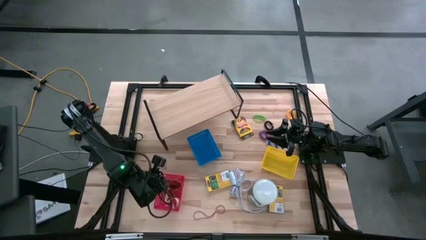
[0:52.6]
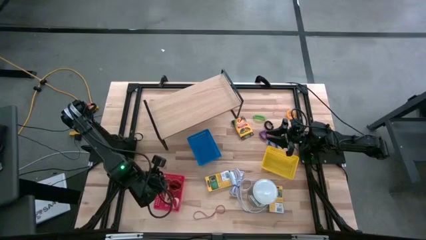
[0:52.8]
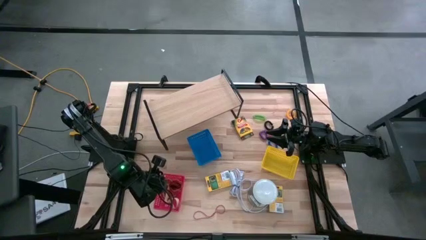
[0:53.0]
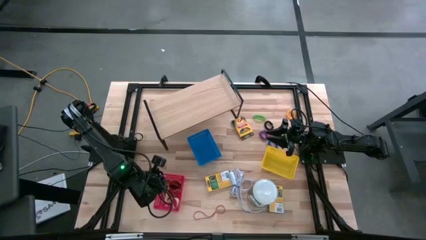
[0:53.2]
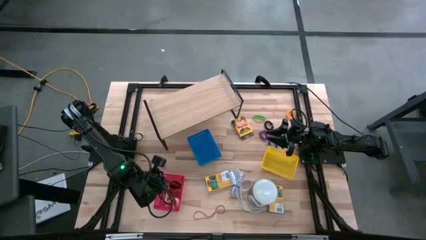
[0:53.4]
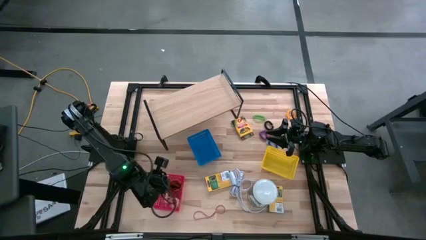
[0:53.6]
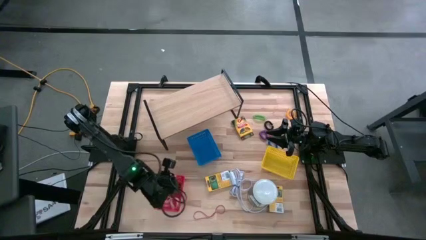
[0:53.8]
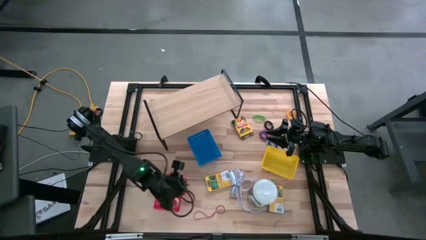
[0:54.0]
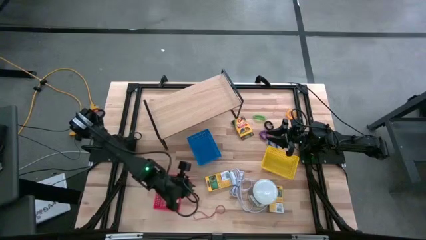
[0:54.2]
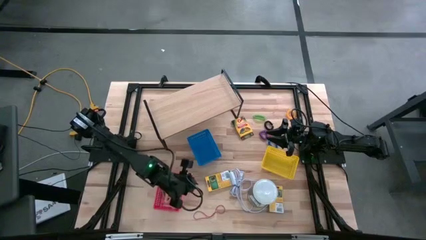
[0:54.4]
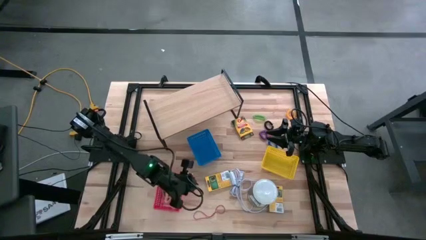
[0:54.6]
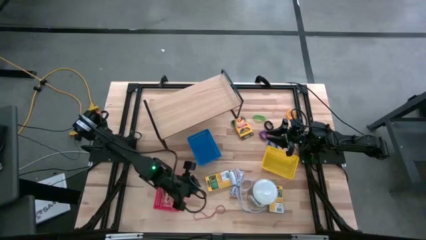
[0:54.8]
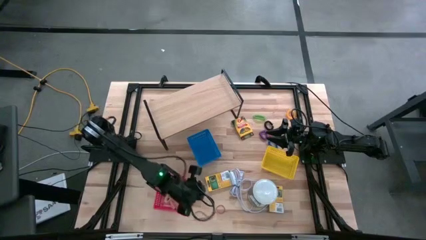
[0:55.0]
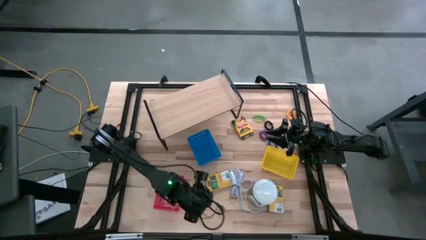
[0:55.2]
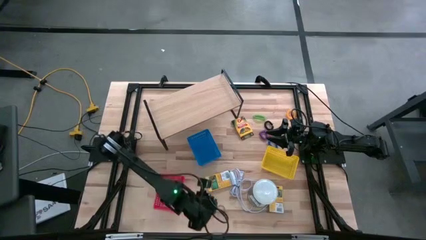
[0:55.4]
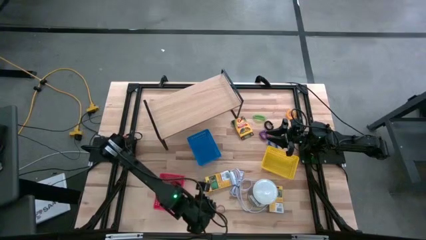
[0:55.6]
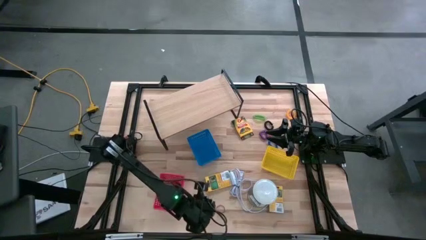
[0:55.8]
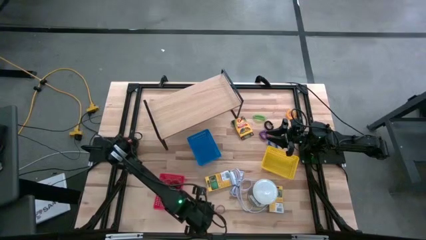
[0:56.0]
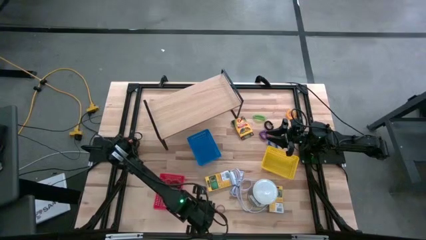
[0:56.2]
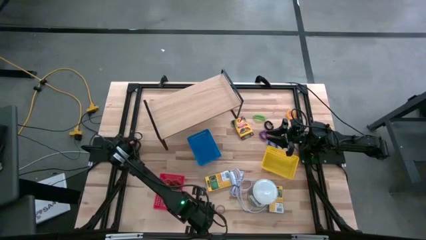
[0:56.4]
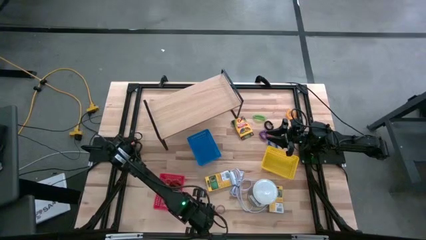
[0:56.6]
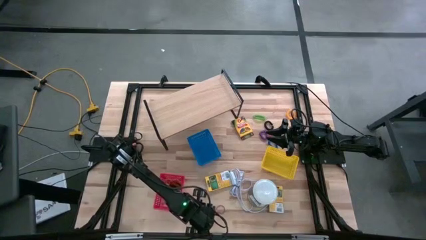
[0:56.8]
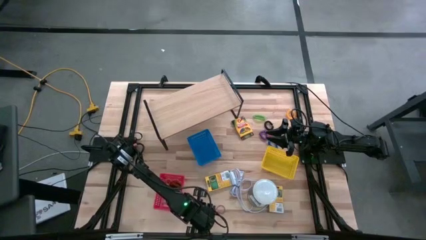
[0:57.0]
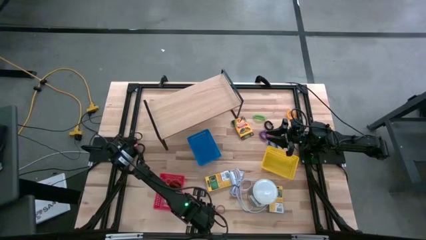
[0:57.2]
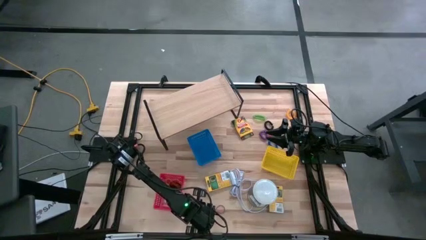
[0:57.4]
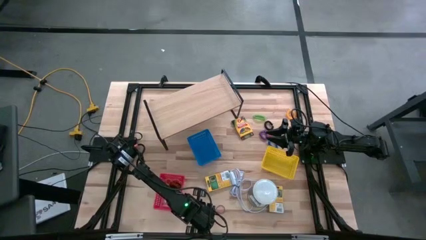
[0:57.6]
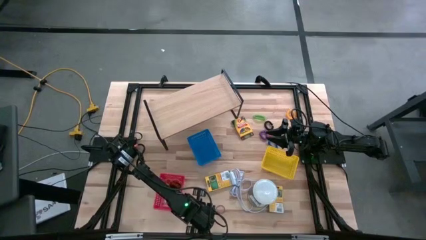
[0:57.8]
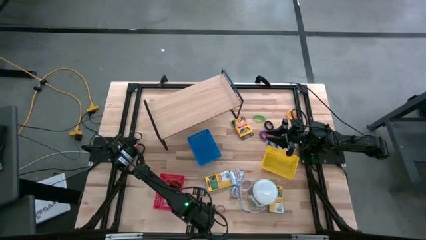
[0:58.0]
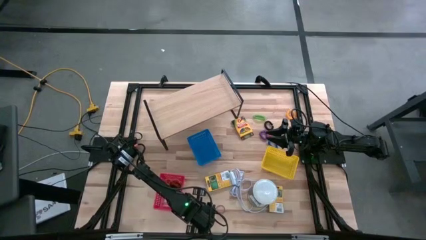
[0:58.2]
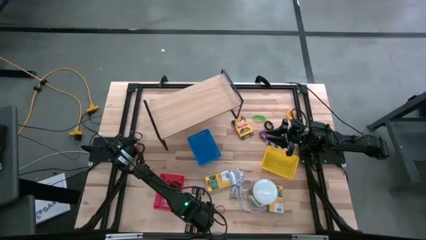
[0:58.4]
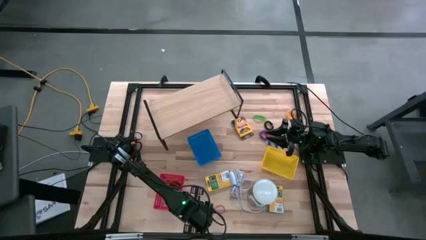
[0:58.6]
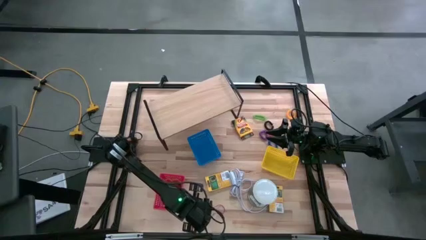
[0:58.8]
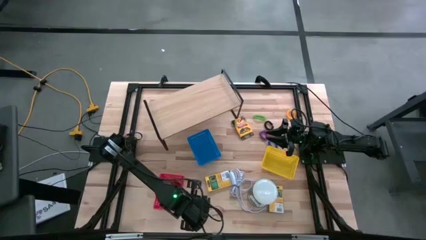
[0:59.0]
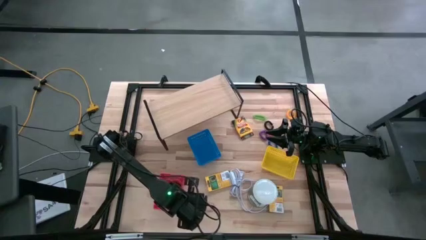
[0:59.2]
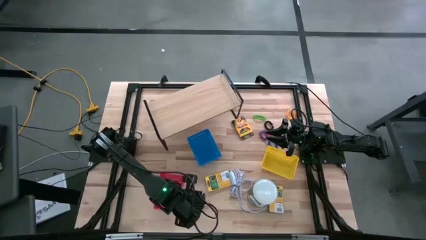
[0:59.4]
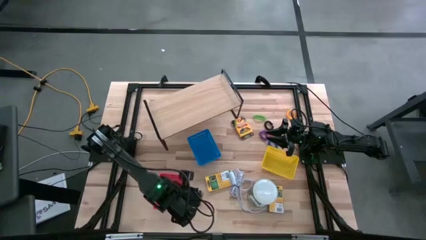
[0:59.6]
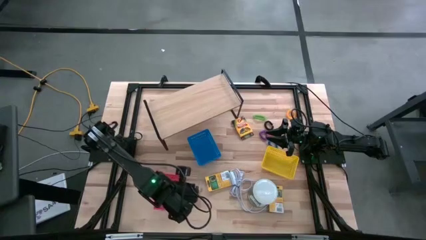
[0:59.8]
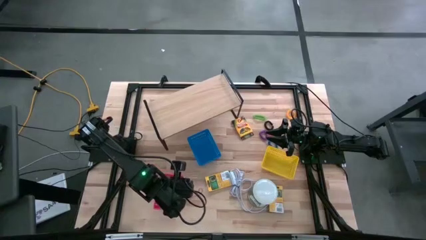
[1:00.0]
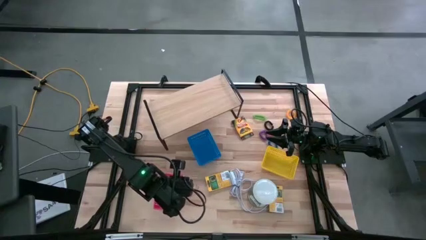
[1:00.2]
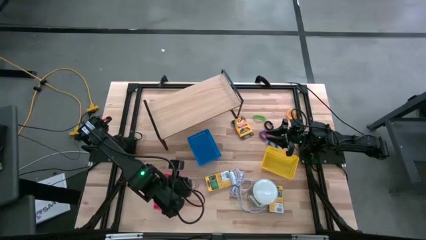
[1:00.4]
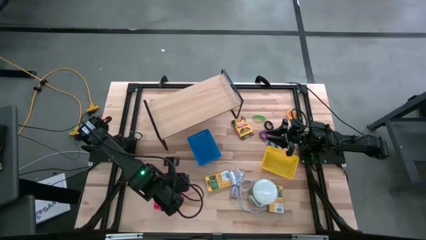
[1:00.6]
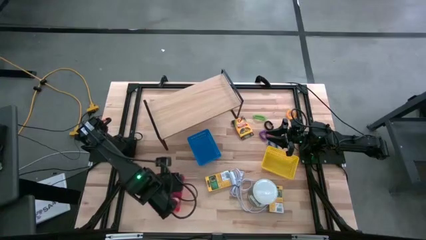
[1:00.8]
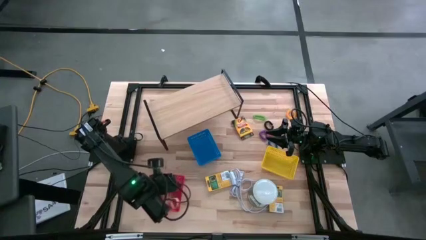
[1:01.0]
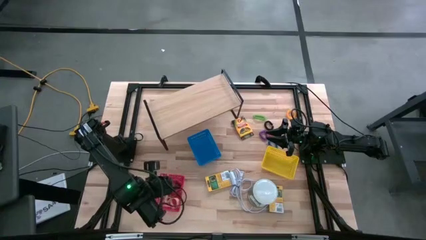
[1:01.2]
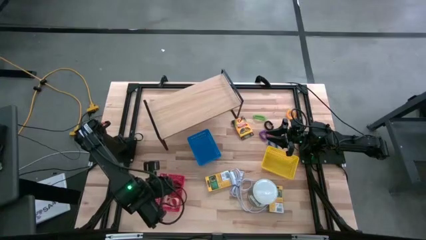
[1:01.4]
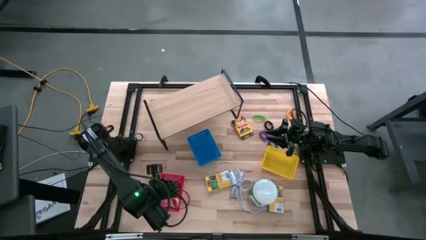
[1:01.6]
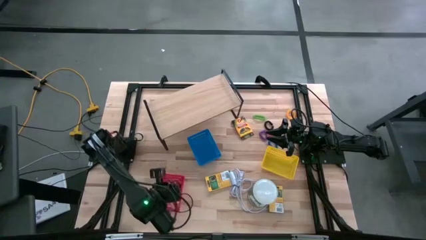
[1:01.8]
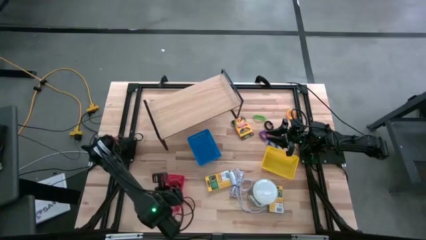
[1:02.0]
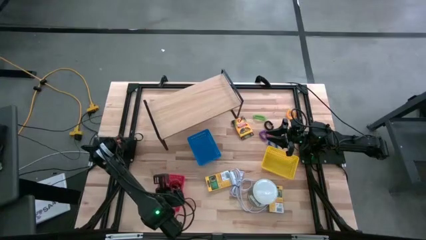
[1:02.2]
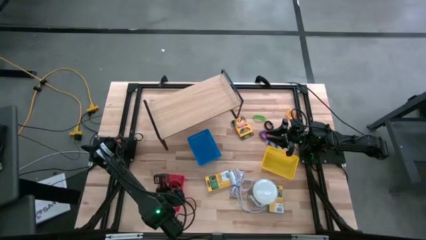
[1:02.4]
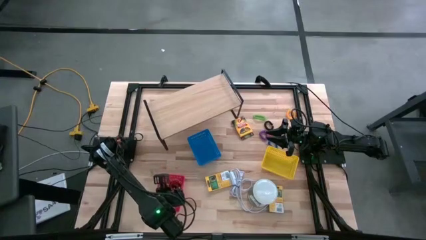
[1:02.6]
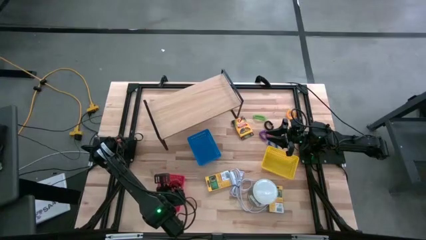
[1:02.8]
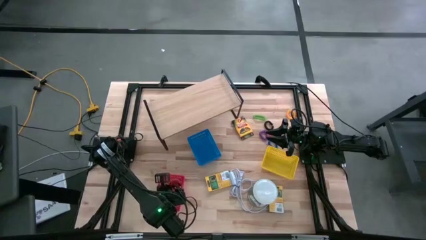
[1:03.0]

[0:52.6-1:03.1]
Task: Pick & Place Office Desk Supplies
Put the red rubber band into the red bin

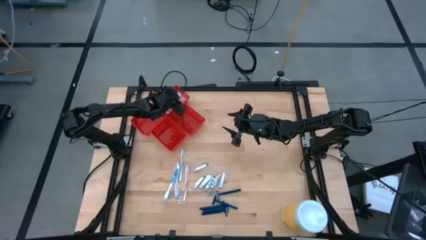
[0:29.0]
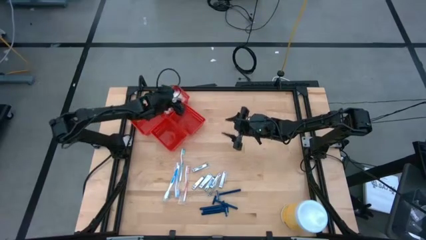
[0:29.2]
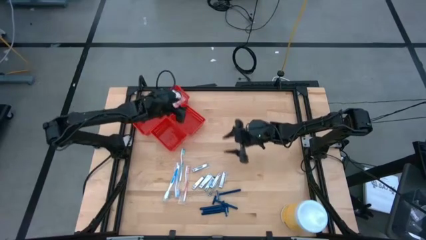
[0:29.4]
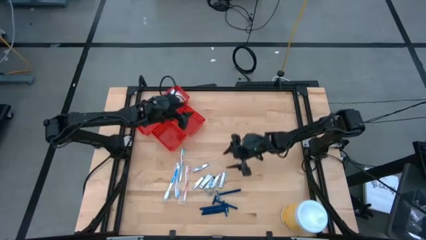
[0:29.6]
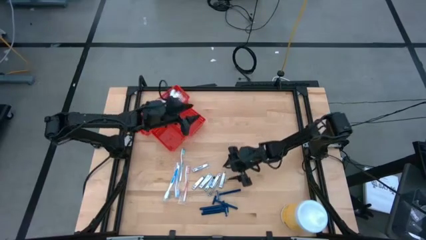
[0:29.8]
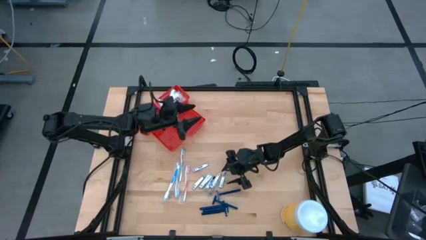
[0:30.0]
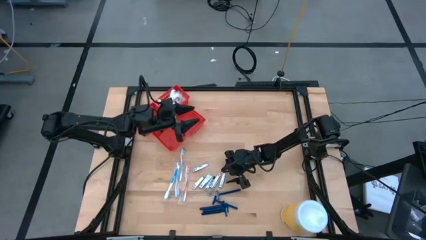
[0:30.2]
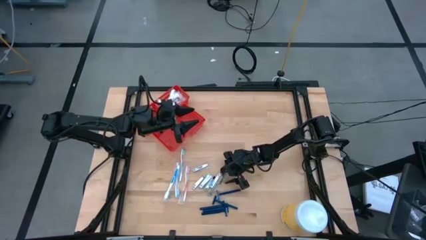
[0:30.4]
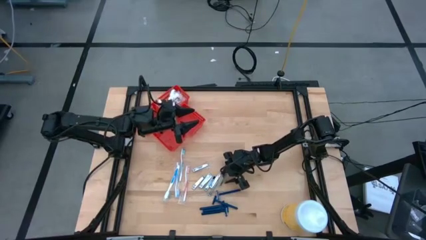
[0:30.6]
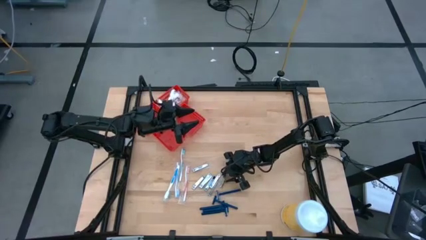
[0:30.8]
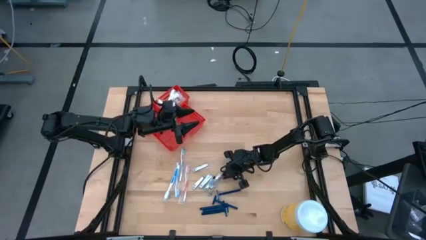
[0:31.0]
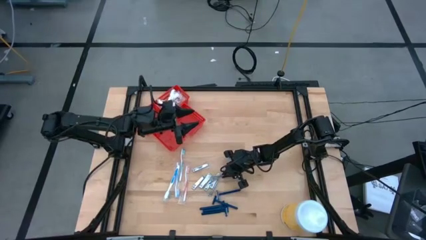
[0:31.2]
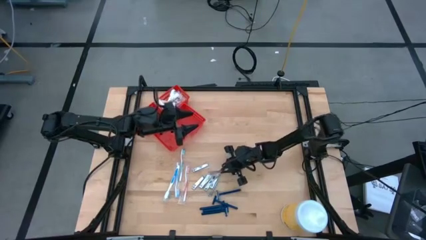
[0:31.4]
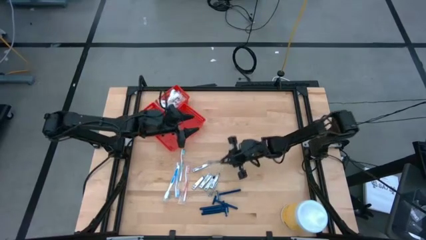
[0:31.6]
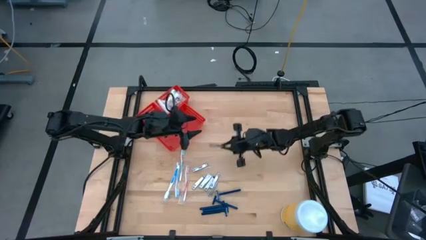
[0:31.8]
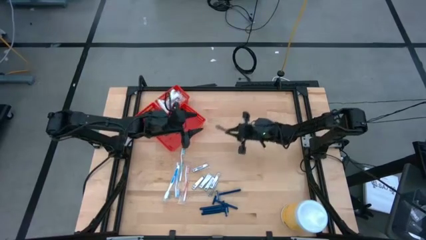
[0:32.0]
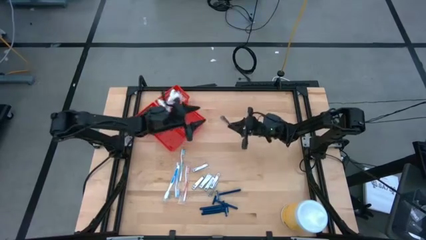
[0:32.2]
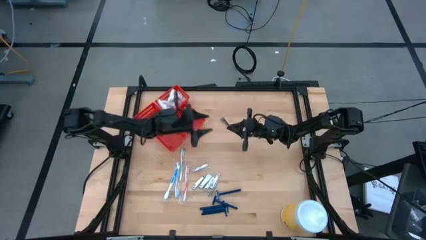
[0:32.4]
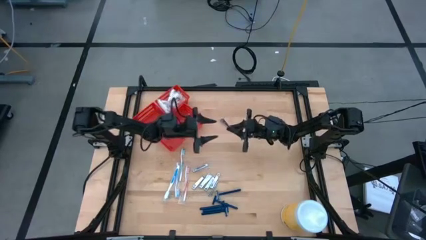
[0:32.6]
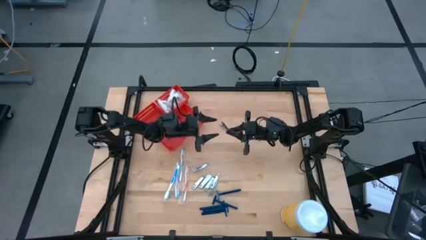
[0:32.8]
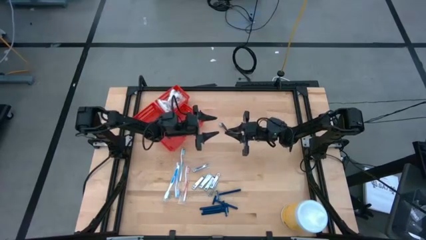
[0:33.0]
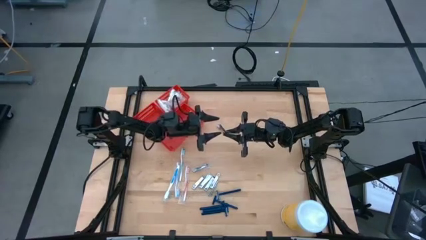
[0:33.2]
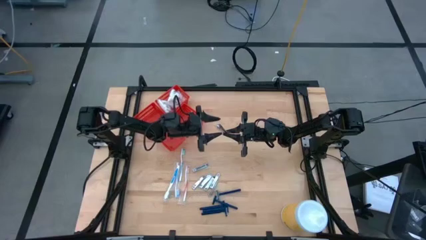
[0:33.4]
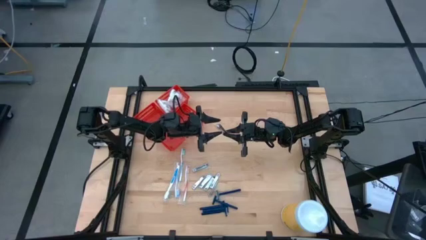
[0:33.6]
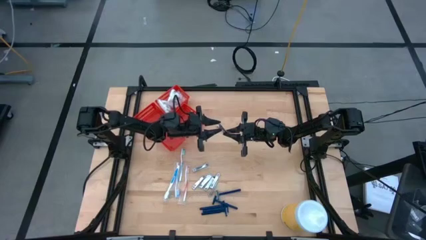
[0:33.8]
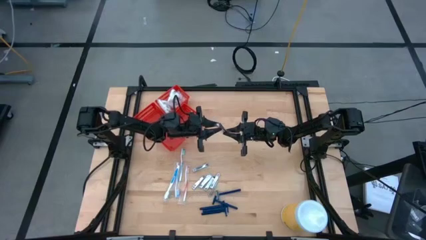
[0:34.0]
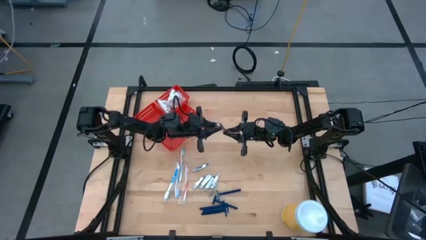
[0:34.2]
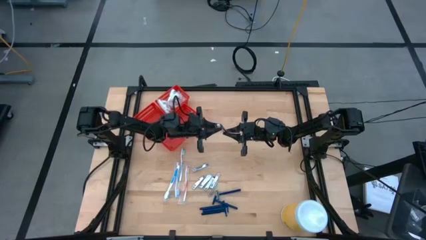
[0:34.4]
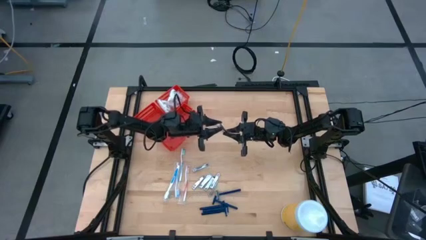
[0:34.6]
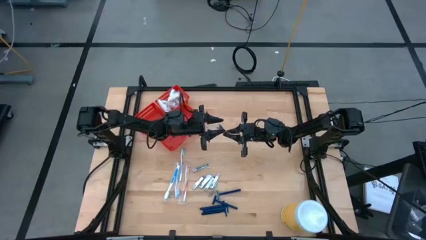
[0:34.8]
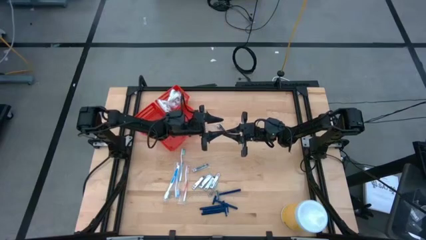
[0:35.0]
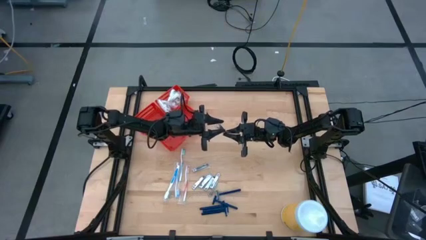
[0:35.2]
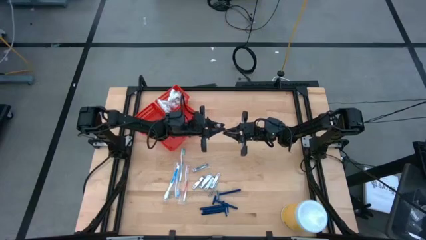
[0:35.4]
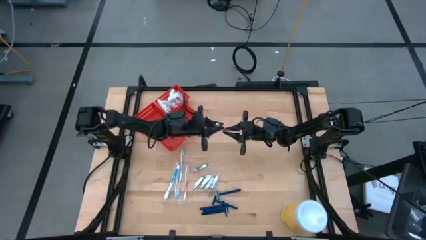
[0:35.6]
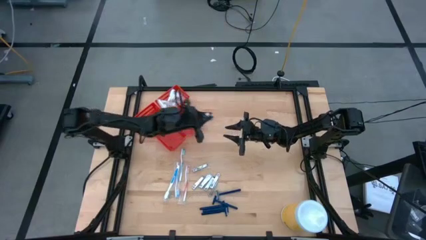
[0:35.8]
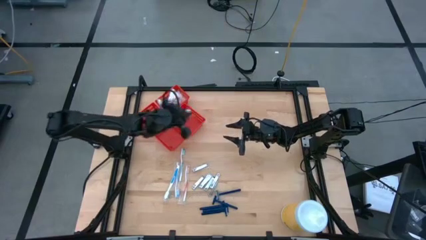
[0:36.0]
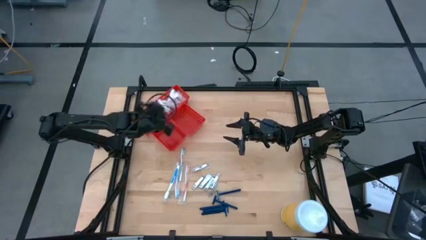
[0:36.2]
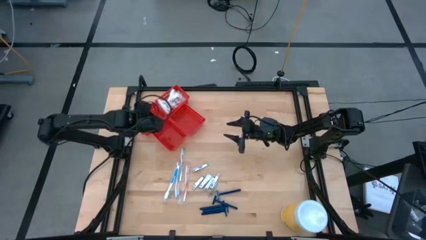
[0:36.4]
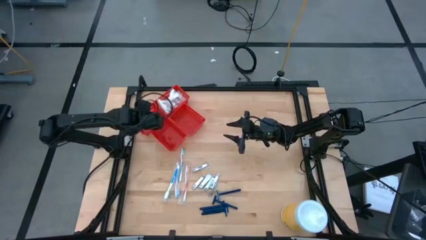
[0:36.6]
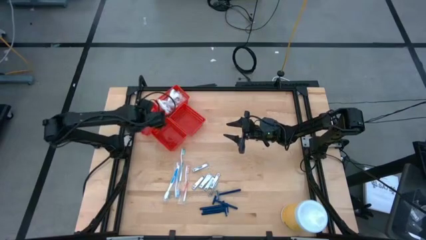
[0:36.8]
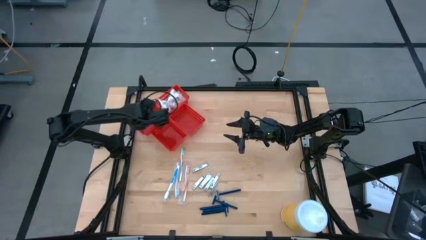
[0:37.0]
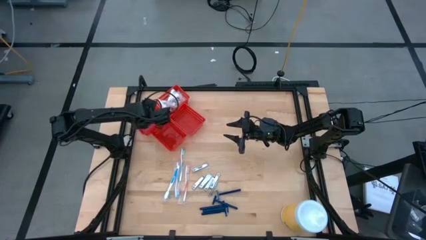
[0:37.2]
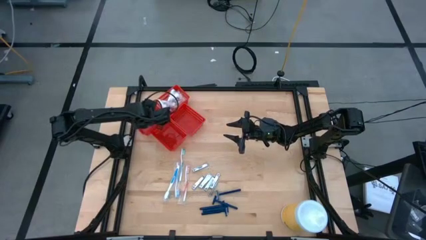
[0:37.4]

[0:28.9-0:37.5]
Task: Pick & Place Travel size toiletries
Put the nail cutter into the horizontal left red bin
